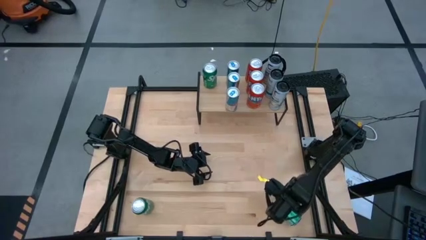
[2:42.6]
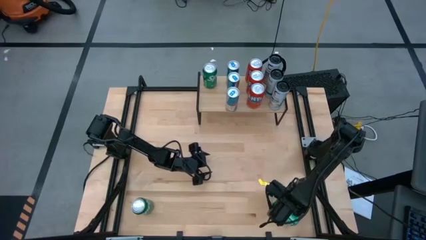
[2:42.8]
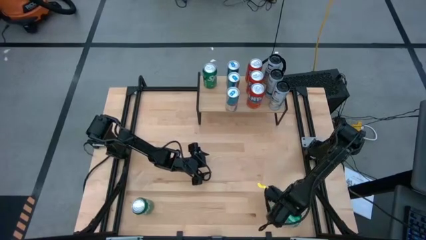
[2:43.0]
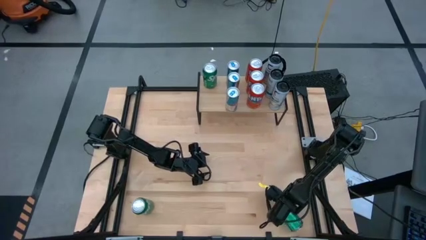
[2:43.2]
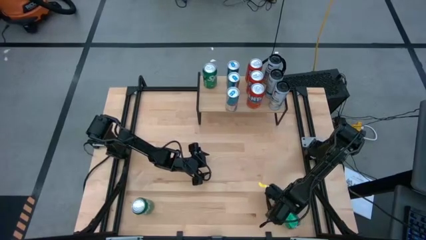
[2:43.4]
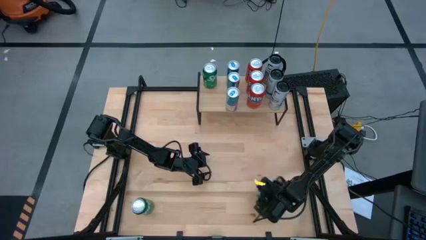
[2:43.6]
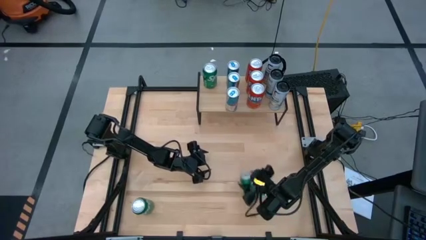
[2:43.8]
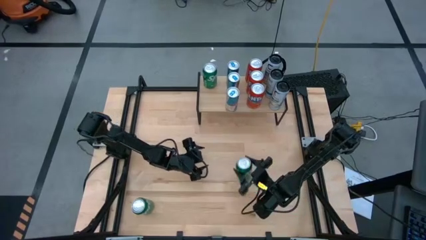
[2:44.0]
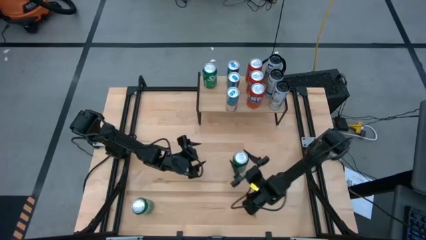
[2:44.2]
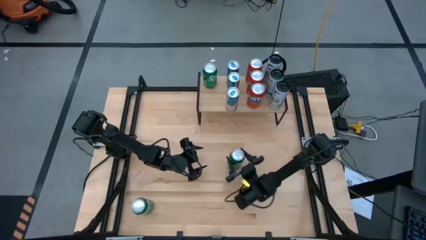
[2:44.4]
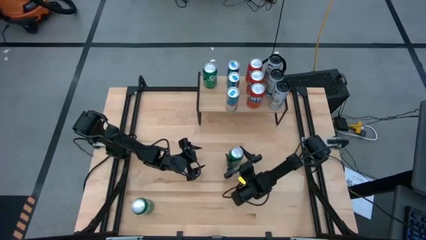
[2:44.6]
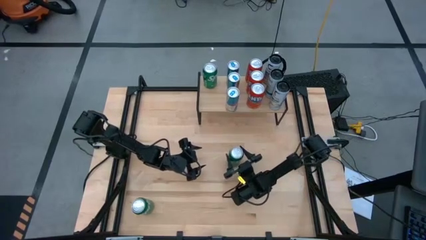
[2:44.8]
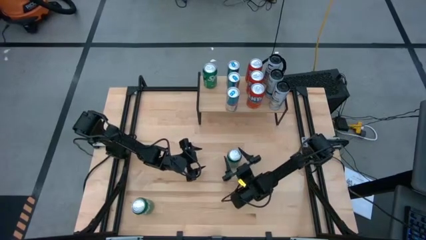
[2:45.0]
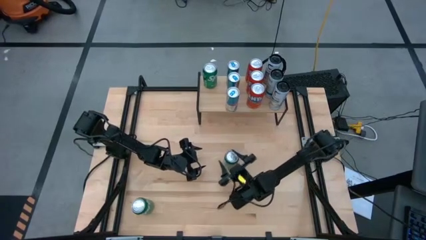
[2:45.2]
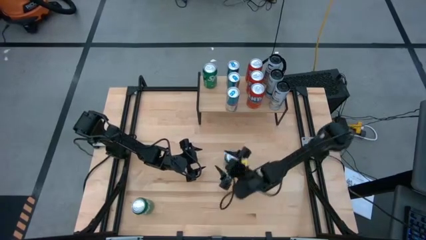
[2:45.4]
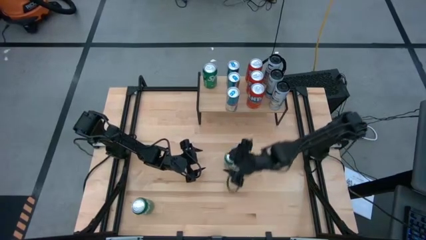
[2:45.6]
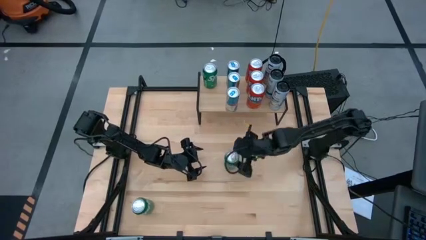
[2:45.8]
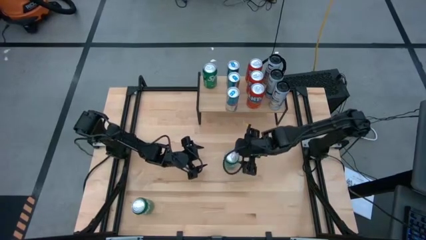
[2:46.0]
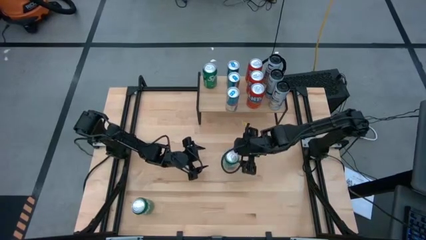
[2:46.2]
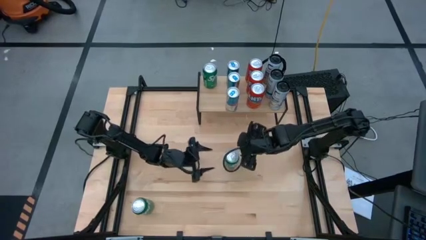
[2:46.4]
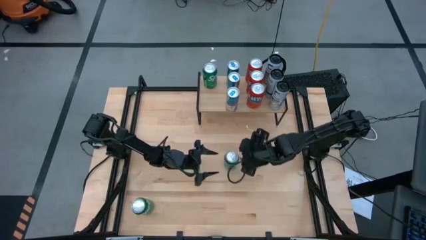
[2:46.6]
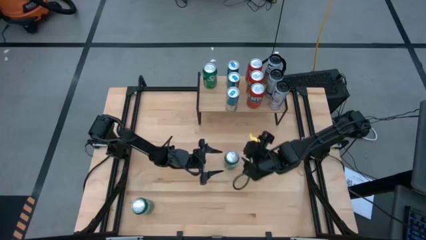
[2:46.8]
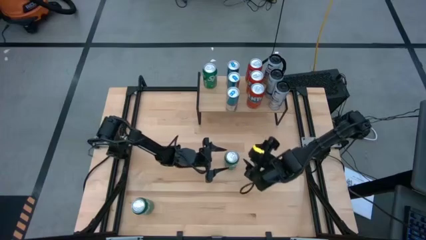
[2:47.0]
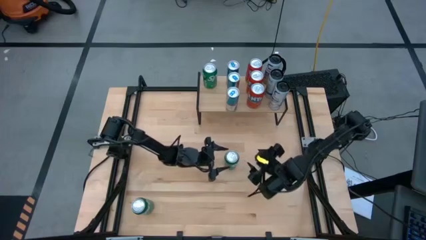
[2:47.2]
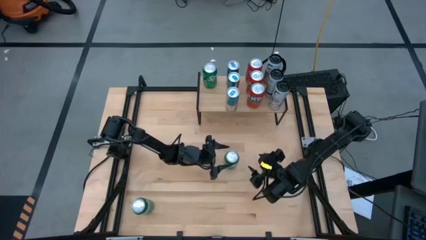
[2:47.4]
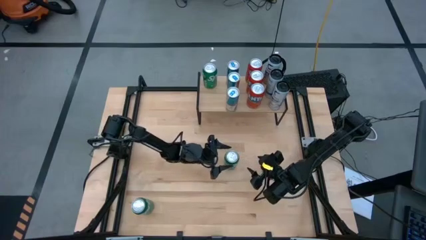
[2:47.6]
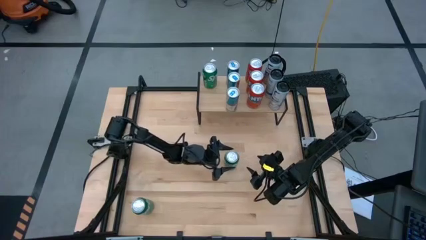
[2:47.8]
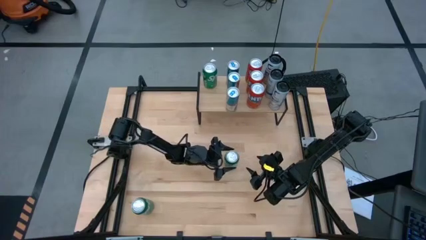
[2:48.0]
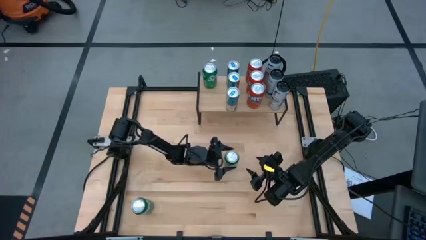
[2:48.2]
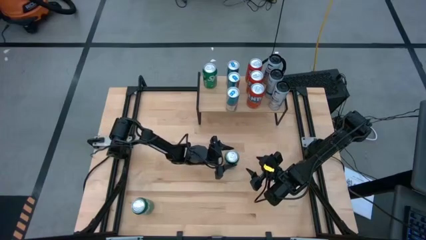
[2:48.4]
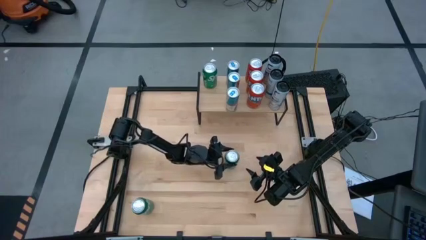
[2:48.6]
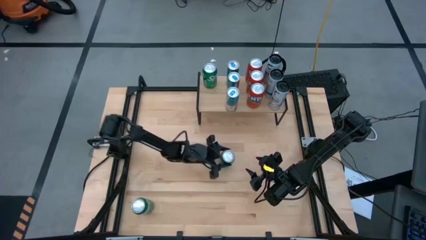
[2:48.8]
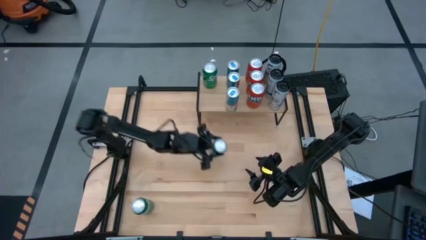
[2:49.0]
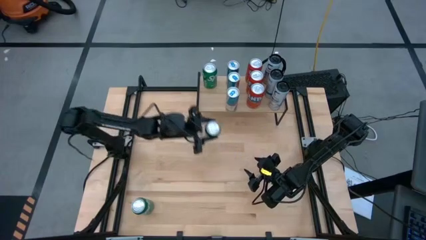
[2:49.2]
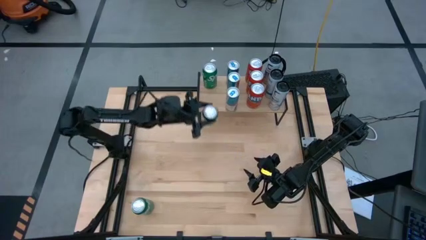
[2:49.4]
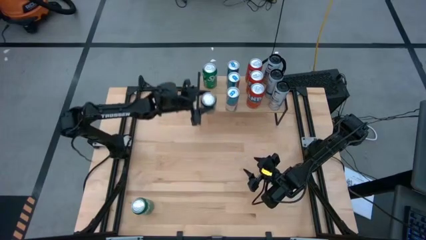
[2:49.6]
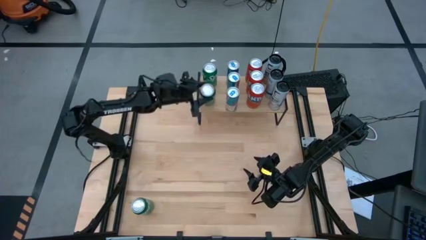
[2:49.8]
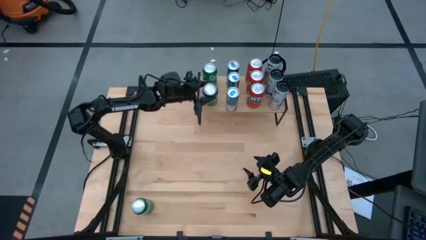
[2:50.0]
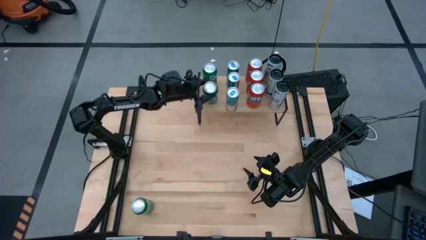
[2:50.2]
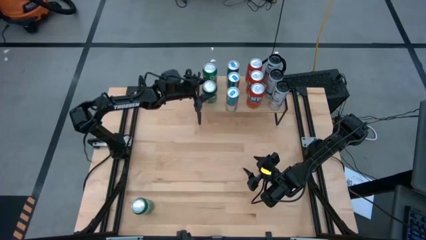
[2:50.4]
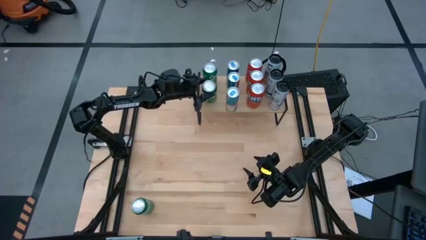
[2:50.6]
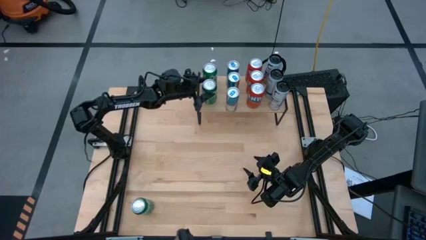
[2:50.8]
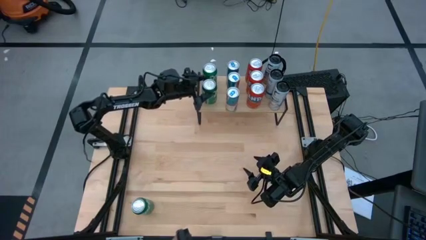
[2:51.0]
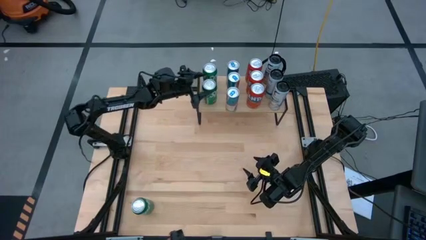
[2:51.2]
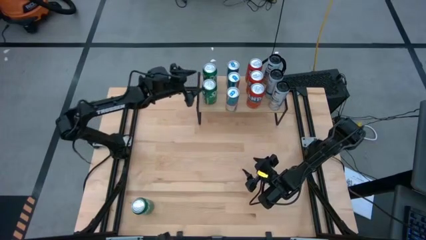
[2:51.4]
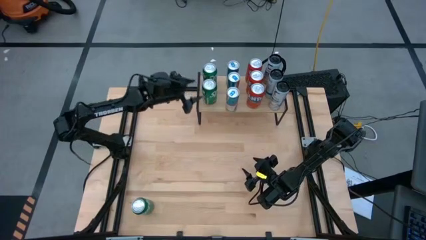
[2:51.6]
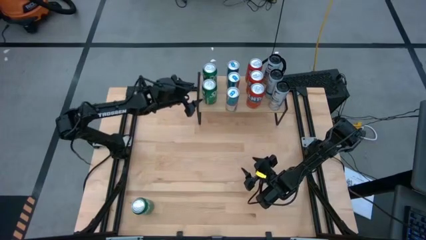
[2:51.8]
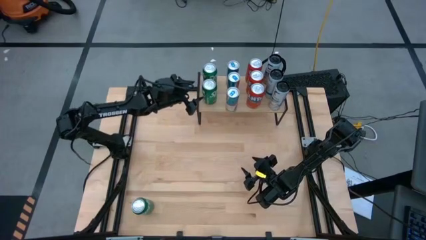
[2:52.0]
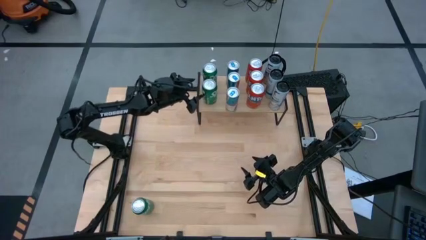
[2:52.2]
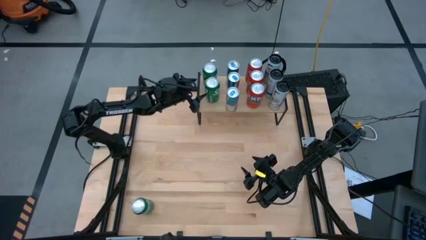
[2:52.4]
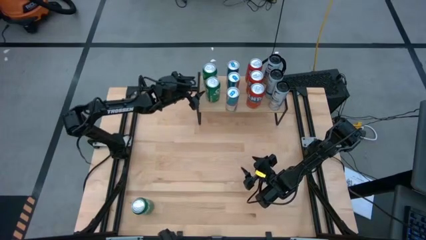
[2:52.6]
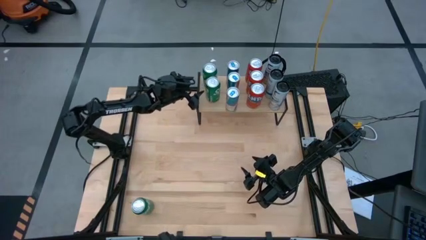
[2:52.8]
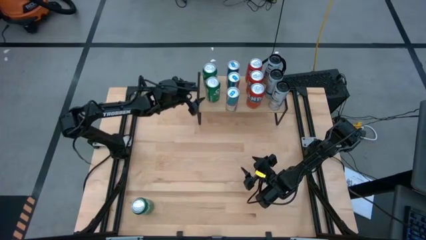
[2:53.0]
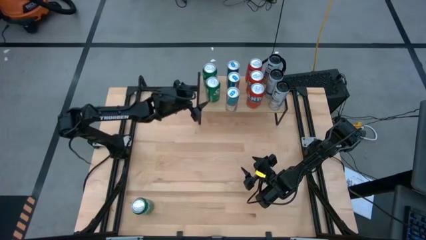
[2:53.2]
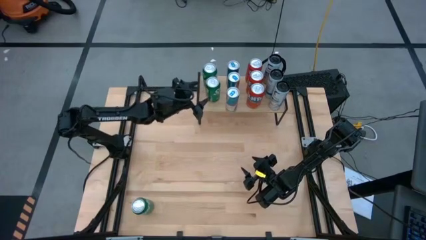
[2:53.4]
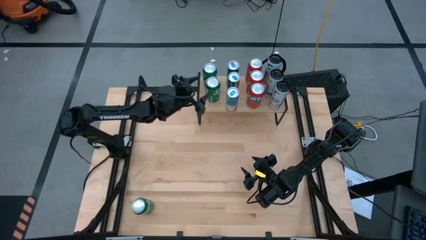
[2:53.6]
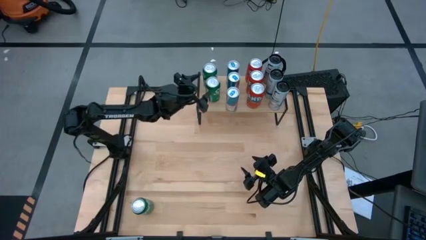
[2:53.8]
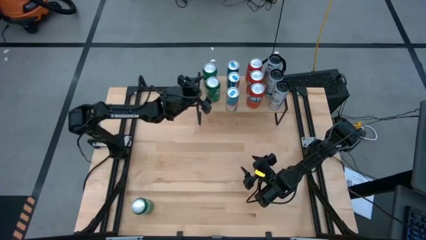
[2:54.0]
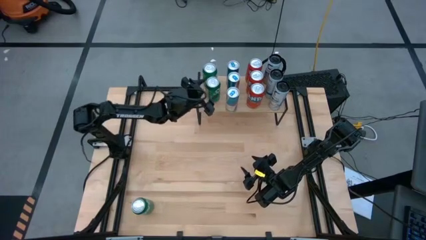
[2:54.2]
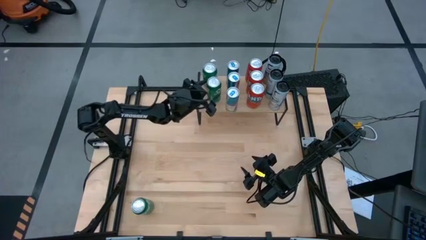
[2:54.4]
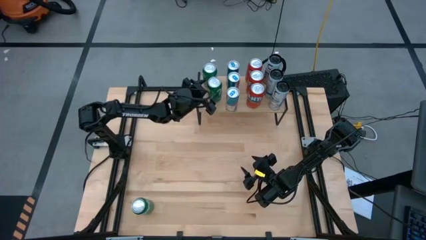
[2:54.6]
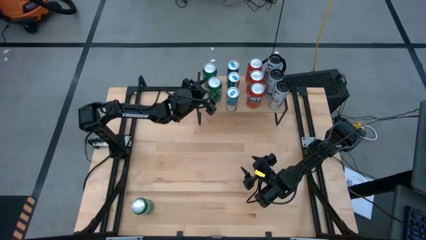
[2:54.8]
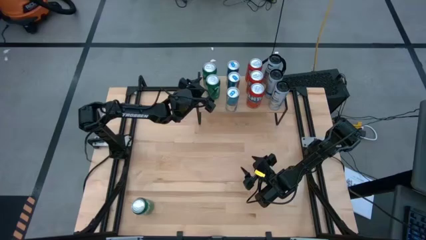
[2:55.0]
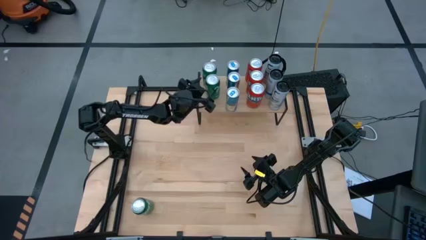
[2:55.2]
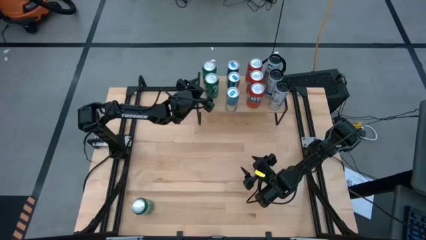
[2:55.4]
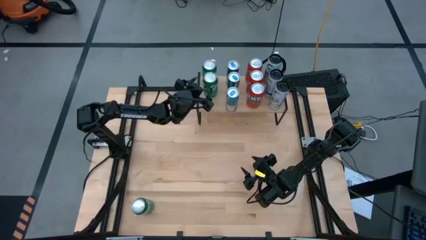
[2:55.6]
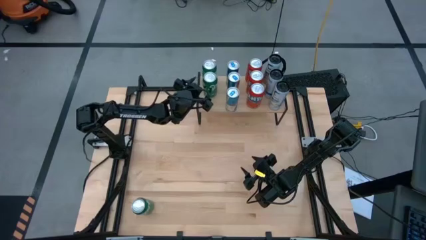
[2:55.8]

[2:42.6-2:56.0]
Task: Place canned beverage on shelf
Put the right green soda can on the shelf aligned with the other green soda can

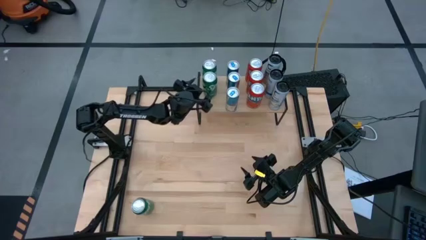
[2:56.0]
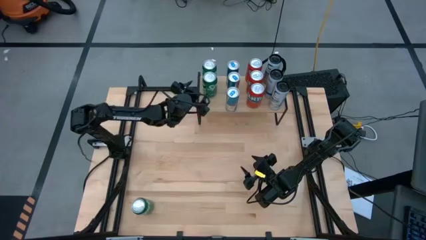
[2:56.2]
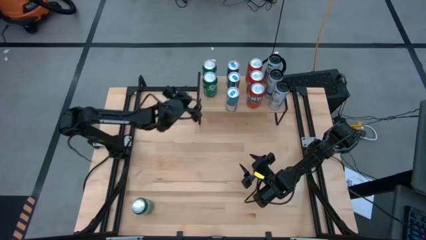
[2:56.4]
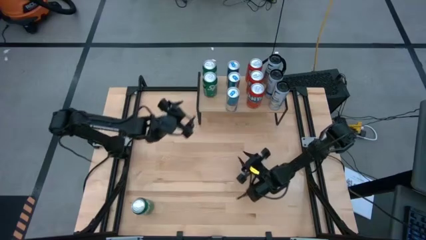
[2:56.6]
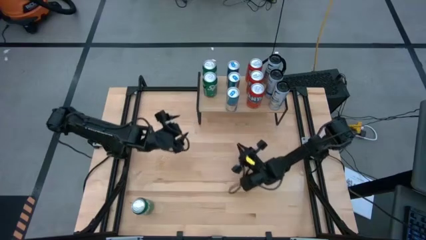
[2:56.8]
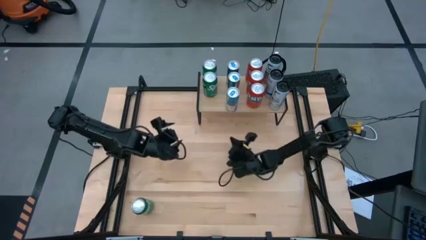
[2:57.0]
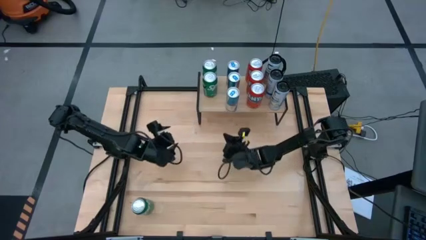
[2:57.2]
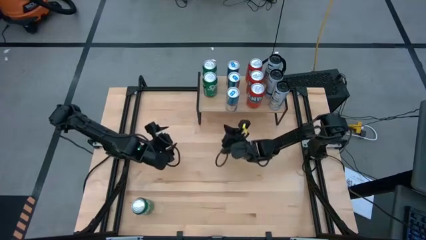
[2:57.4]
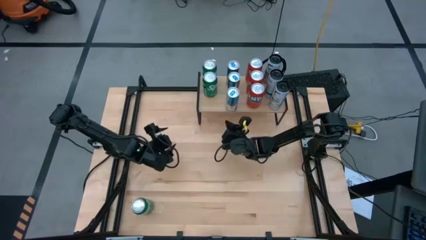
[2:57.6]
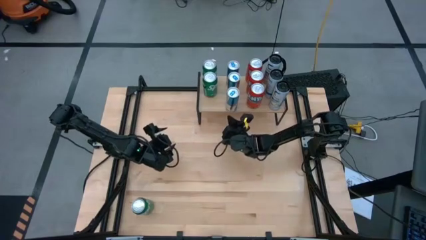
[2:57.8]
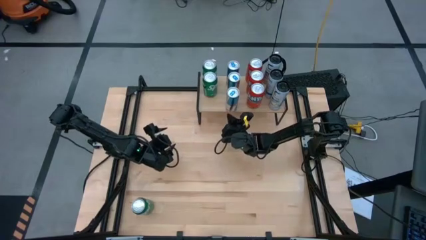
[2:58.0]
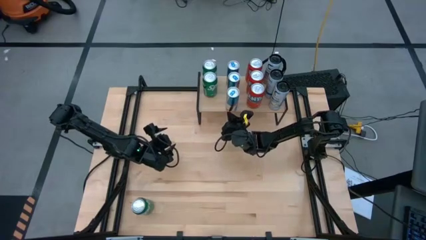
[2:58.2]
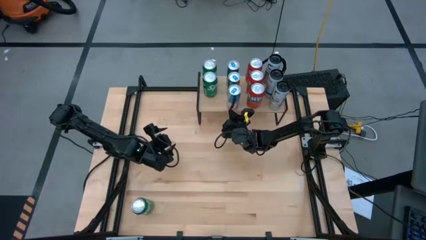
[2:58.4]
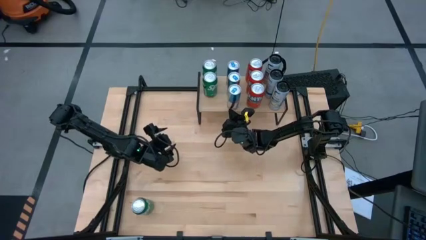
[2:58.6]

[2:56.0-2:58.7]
Adjust the blue soda can on the shelf

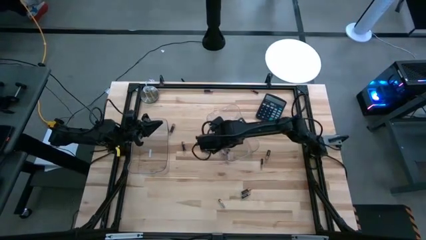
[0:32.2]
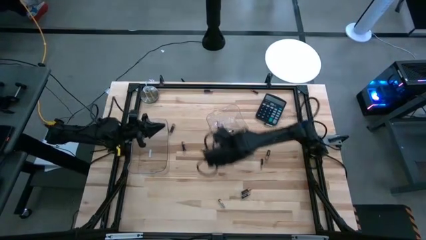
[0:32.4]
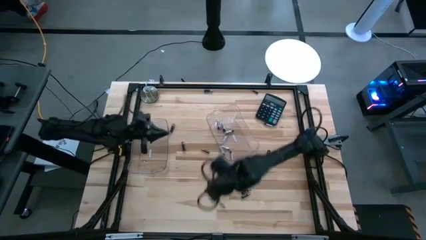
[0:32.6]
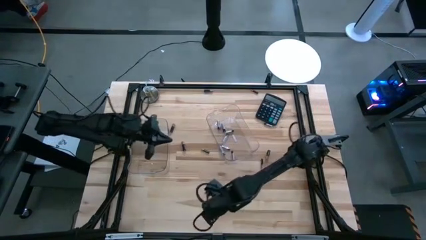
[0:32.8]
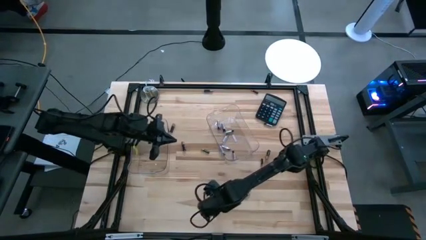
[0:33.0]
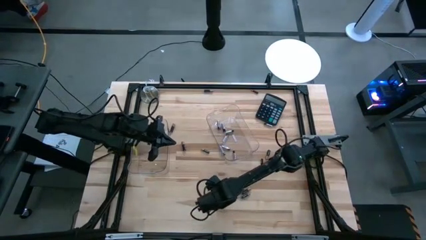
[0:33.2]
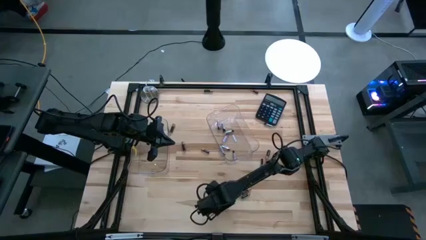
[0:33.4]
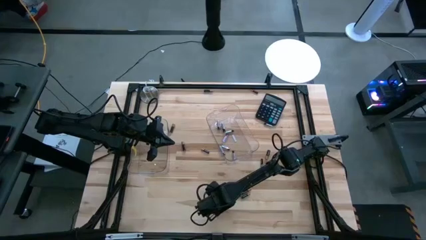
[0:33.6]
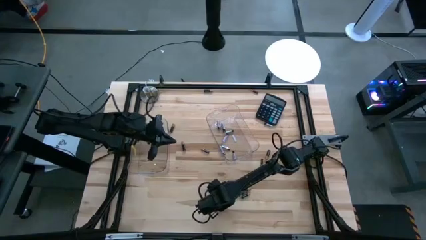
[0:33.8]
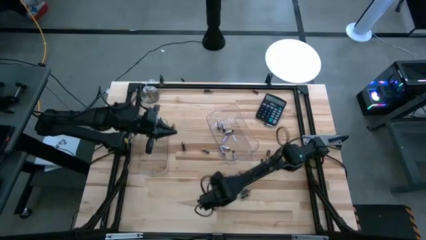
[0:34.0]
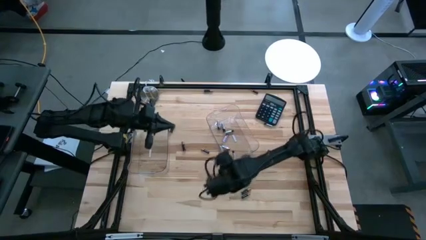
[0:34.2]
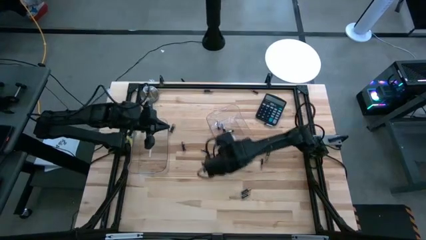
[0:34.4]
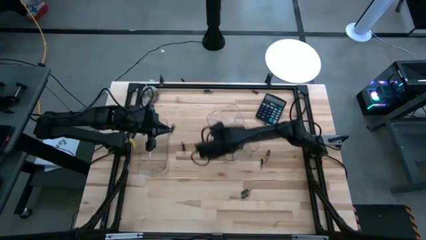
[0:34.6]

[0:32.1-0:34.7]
Task: Sort batteries
Put the silver battery into the right transparent bin
